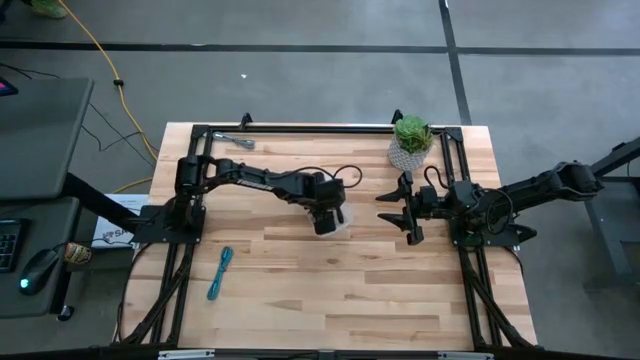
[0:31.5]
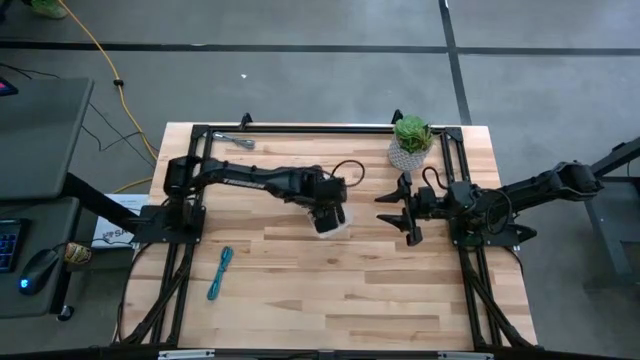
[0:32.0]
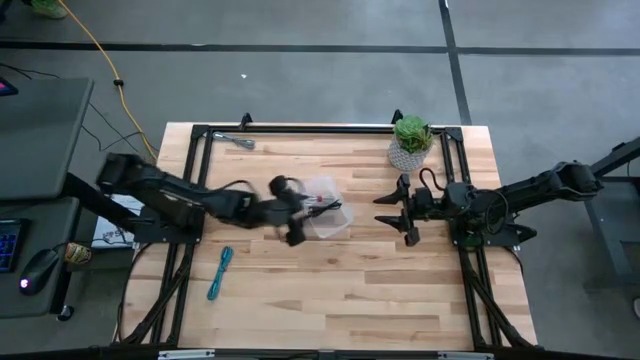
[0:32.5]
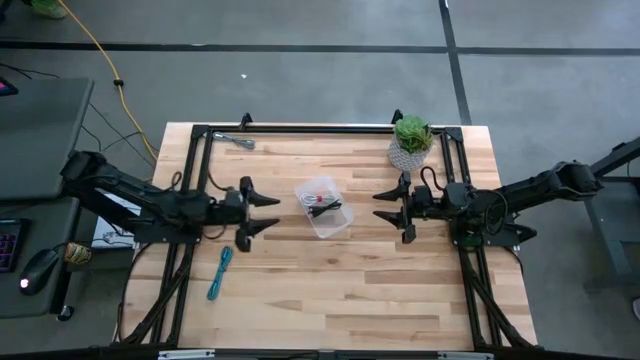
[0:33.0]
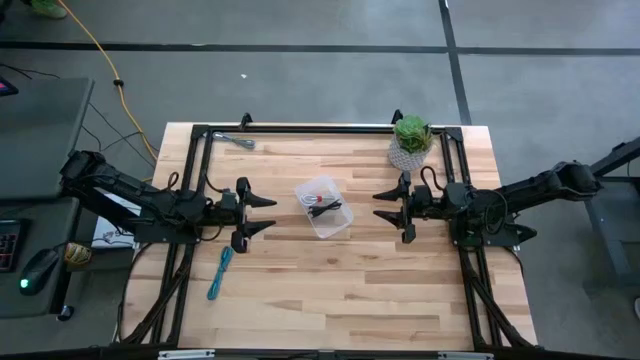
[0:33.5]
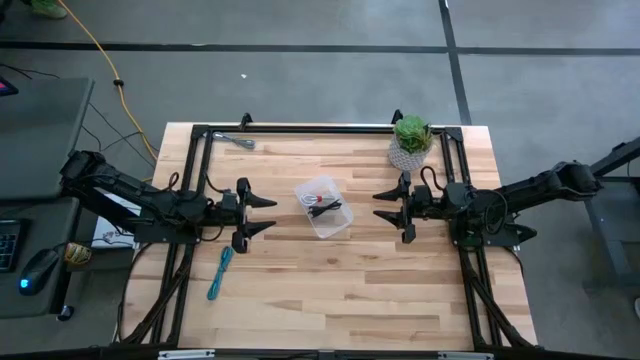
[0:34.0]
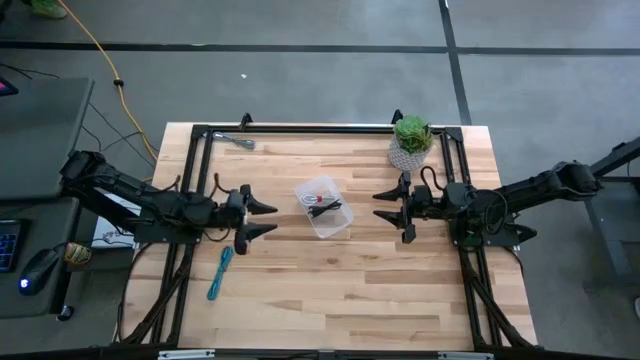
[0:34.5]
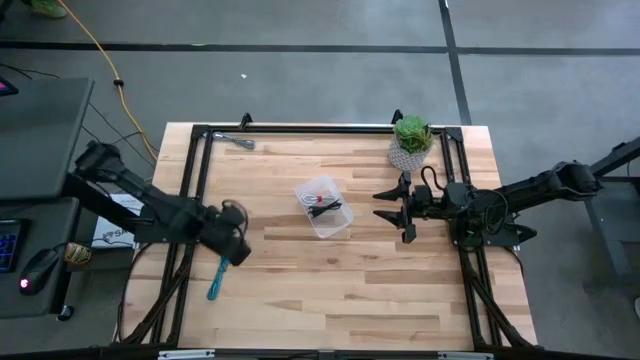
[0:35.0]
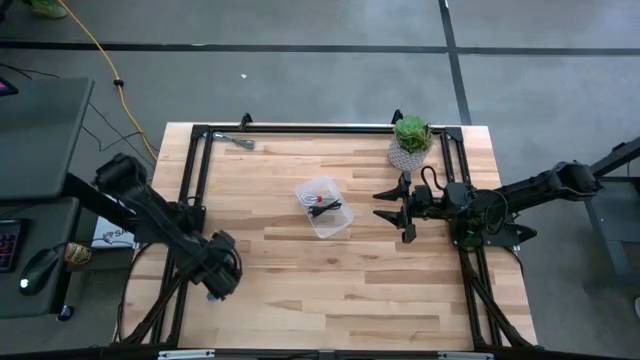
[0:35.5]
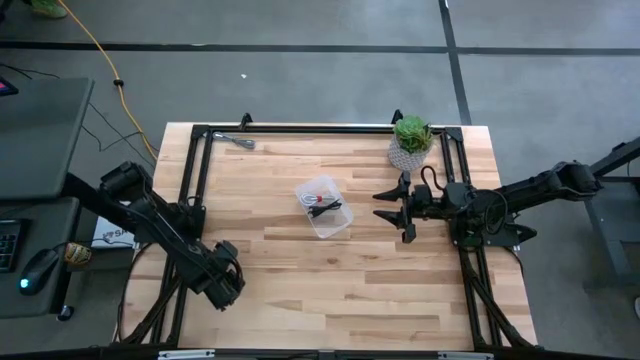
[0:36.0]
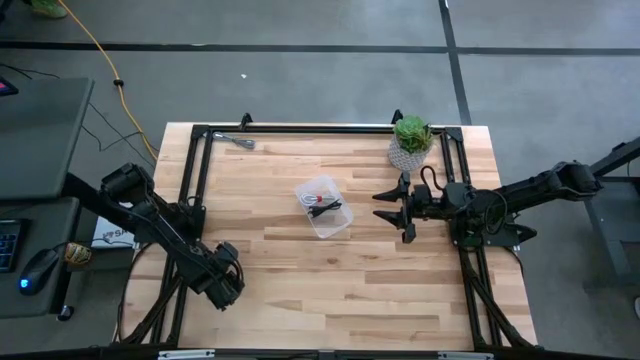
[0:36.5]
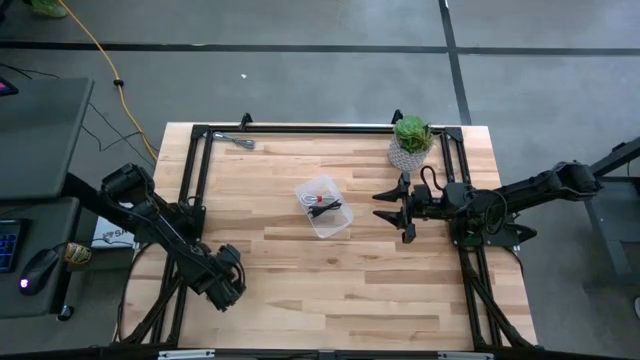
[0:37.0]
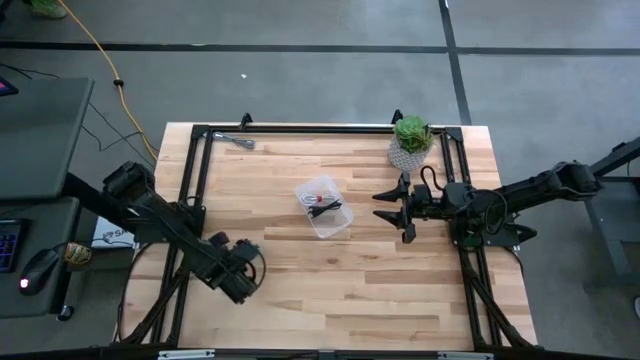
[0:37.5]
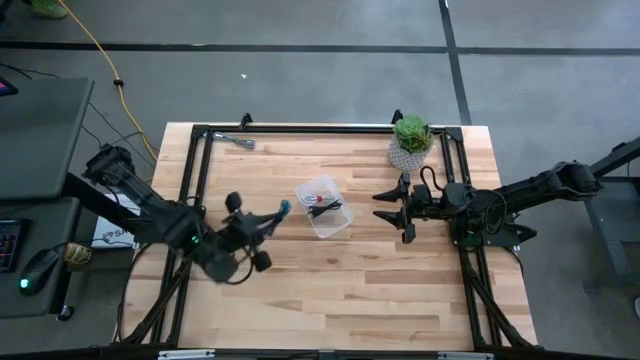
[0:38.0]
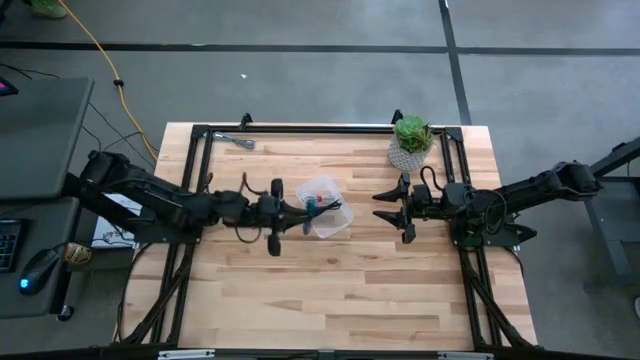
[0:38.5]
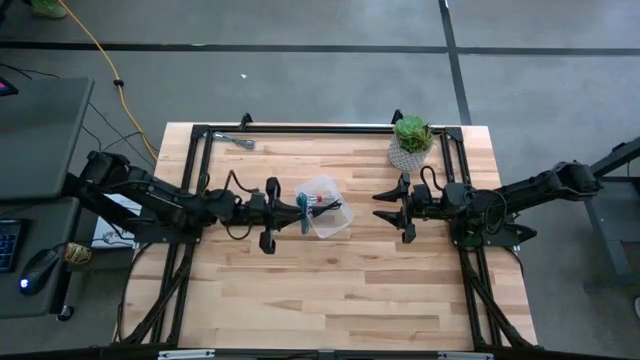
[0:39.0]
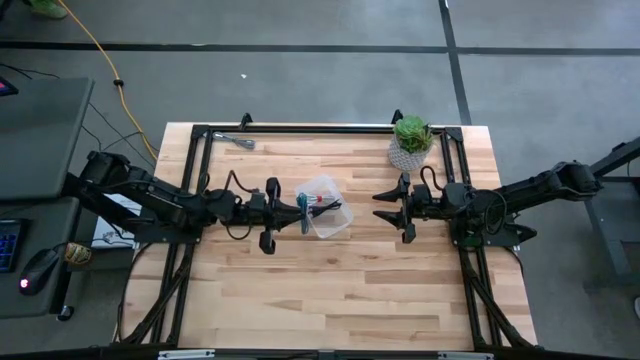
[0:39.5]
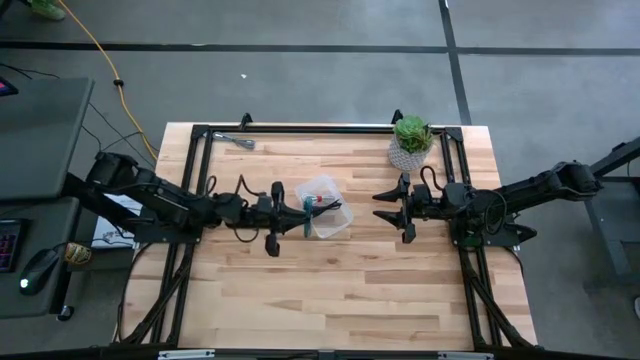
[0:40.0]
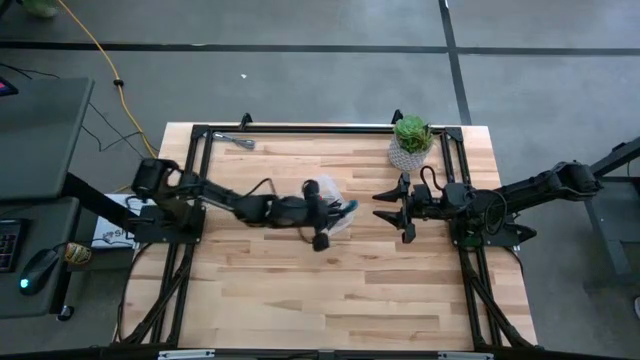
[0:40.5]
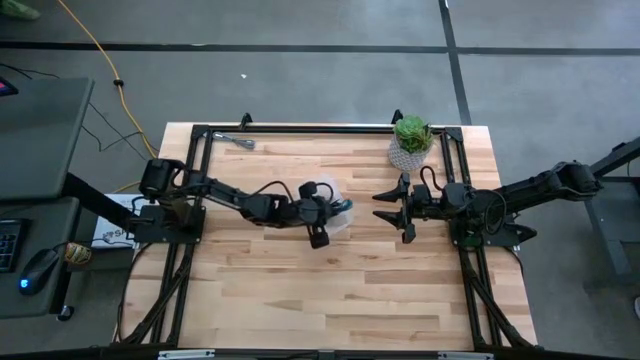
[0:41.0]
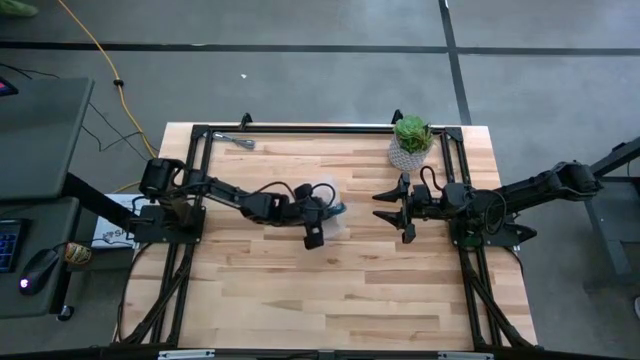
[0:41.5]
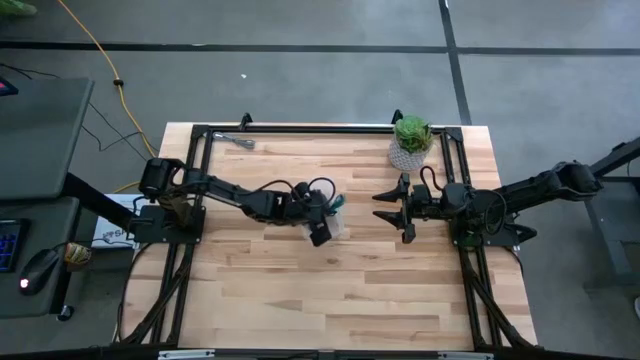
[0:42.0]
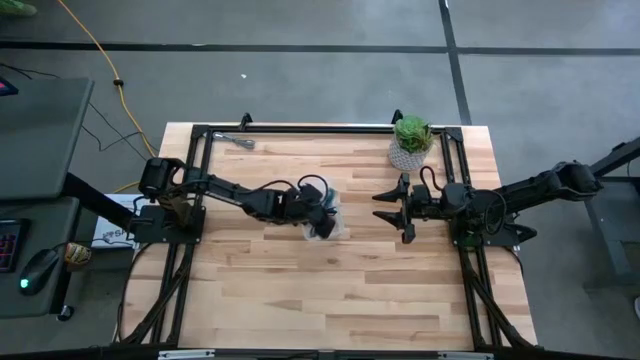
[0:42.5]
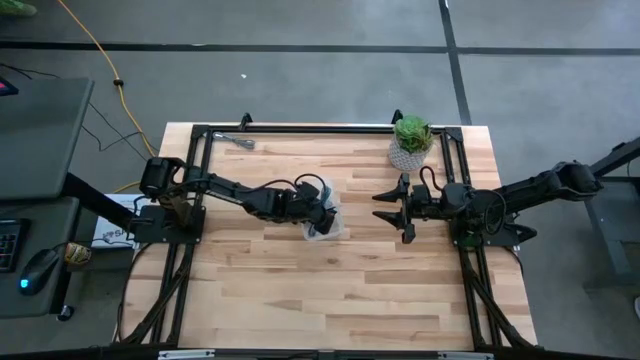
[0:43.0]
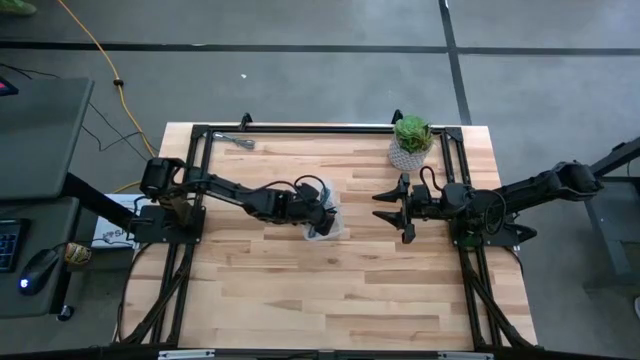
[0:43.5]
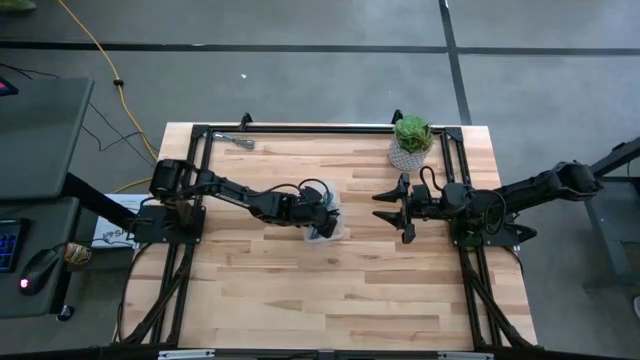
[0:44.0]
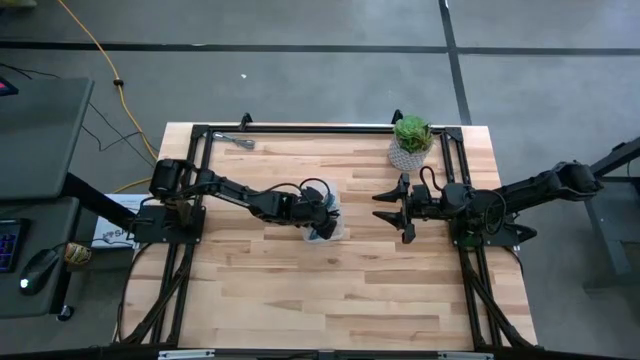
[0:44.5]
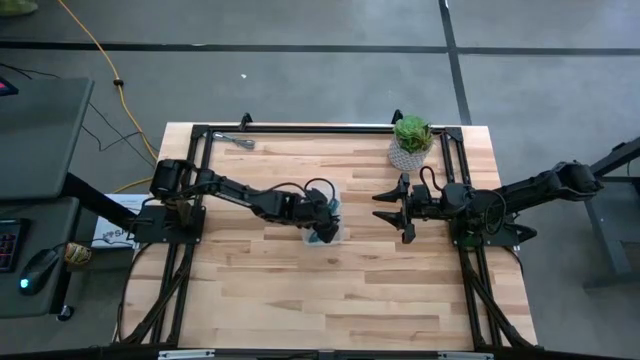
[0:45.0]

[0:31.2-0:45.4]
Task: Pick and place USB-C Cables
Put the blue charger cable into the transparent bin

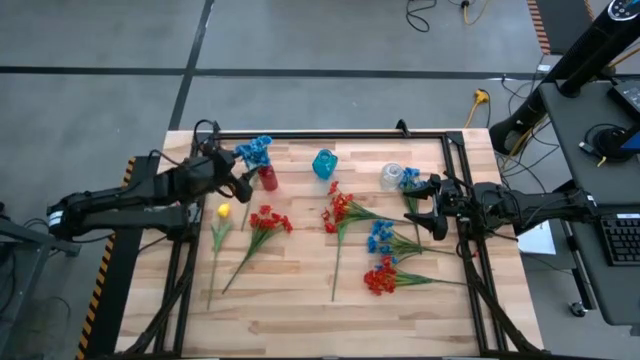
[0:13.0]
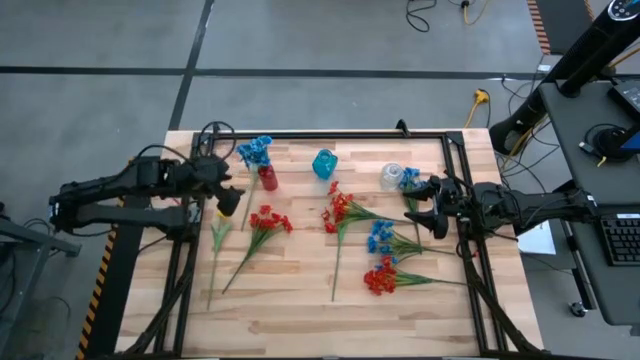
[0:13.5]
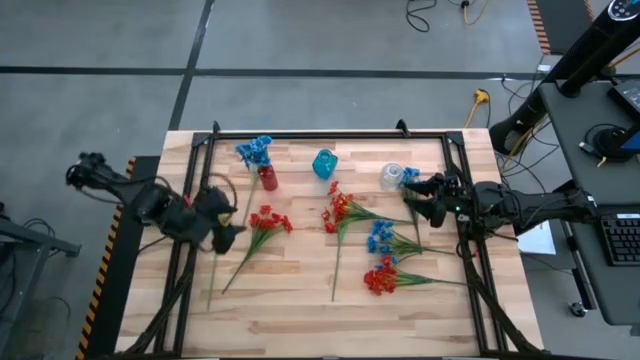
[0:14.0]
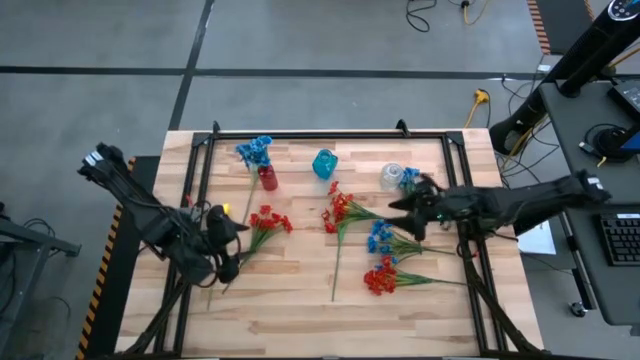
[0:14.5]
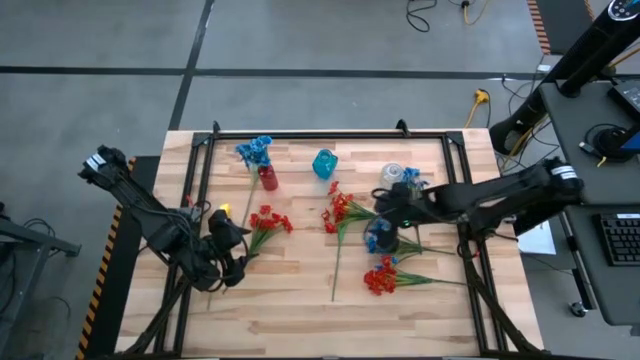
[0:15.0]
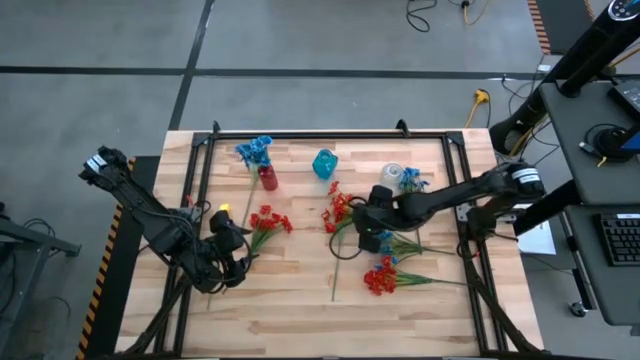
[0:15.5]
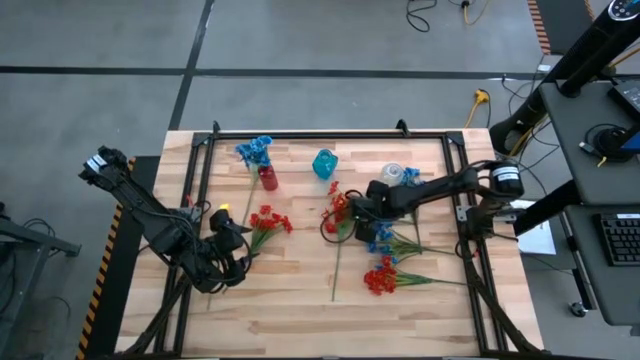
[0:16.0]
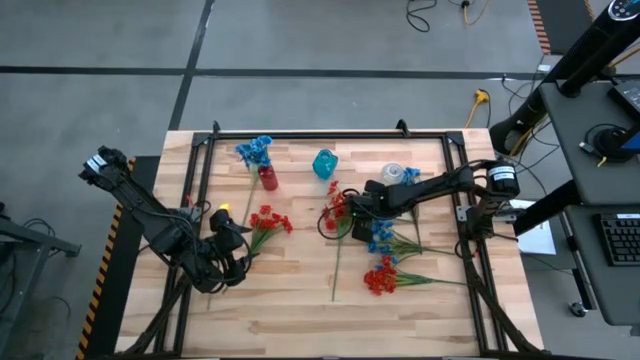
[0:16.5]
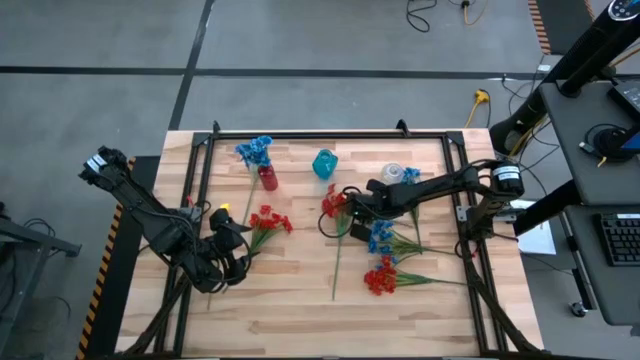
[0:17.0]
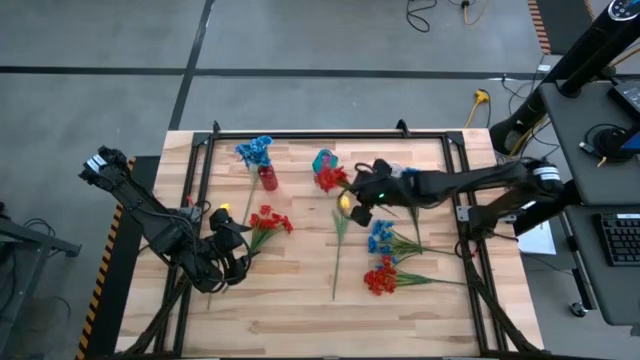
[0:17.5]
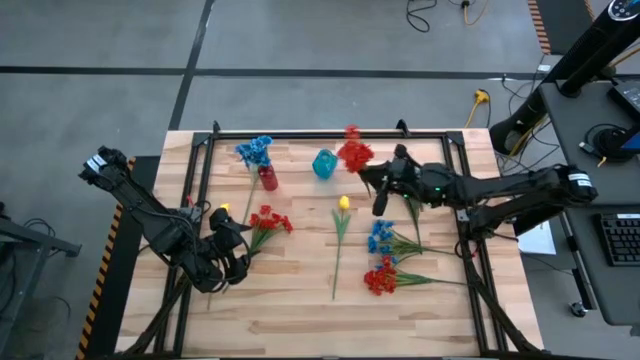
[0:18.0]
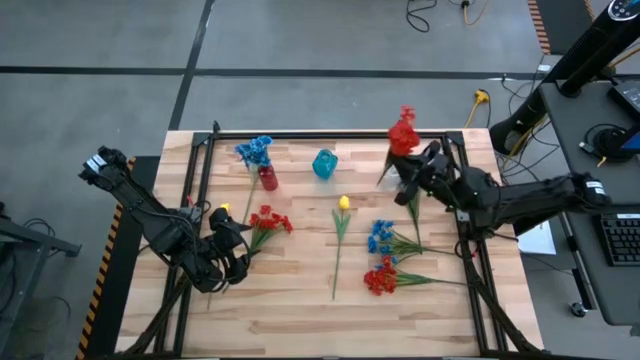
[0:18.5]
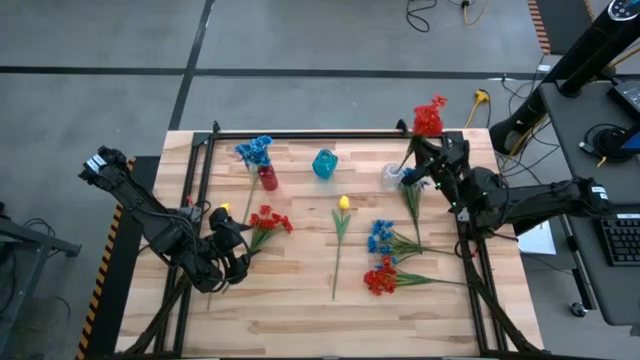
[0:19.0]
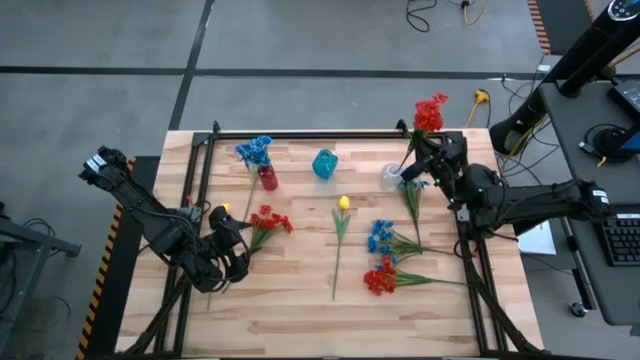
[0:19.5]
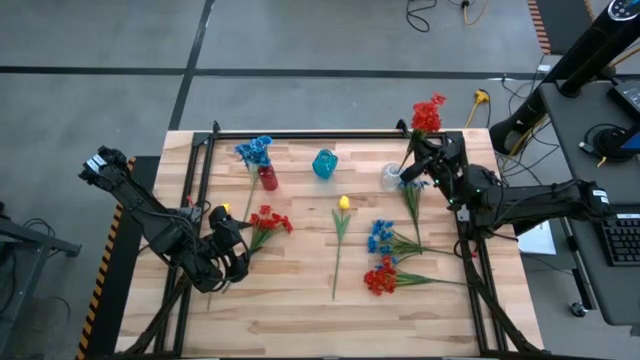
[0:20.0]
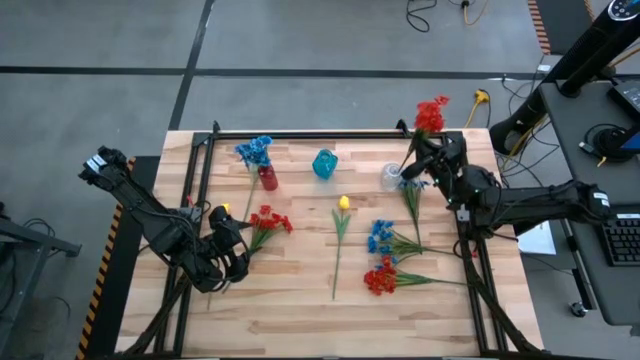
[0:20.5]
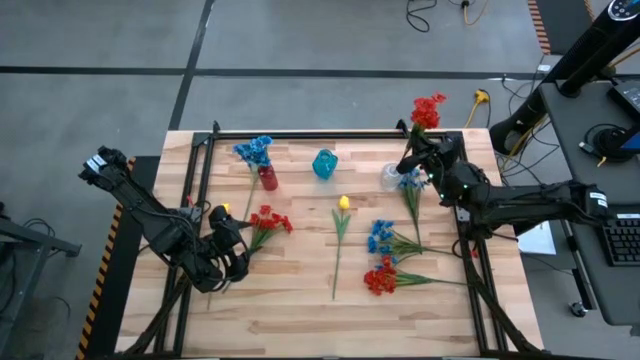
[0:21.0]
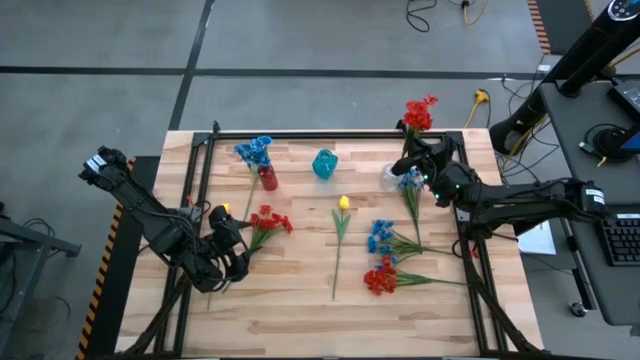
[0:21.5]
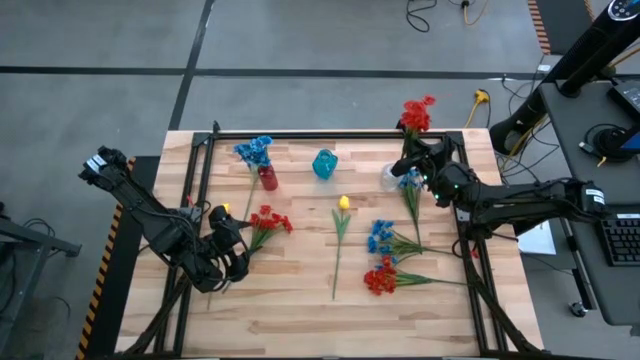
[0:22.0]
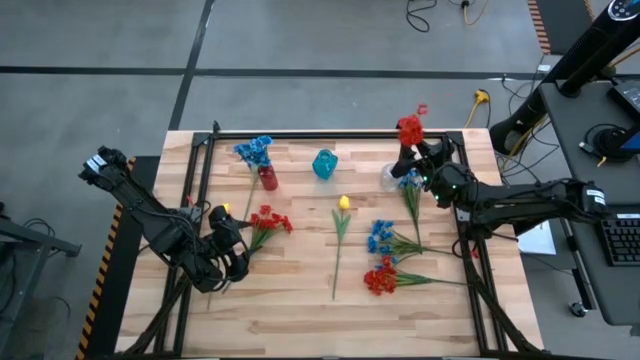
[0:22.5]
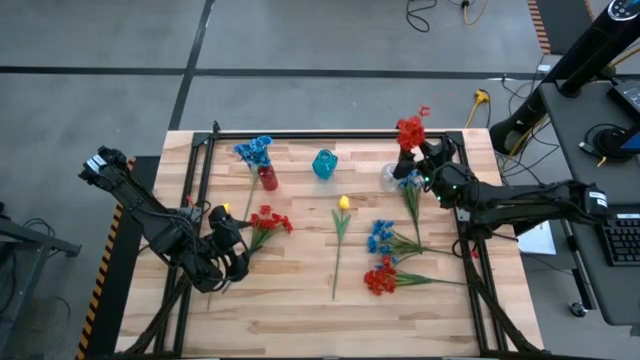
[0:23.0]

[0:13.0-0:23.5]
Task: Sort flowers into vase by color
Put the top center red flower into the transparent vase
